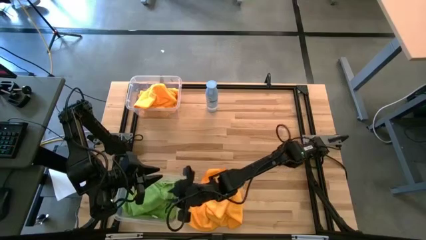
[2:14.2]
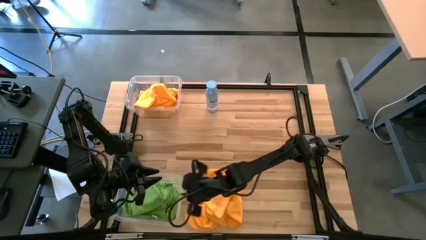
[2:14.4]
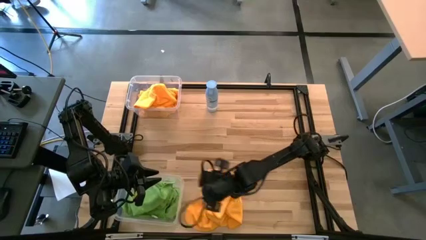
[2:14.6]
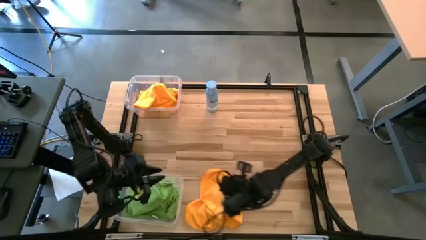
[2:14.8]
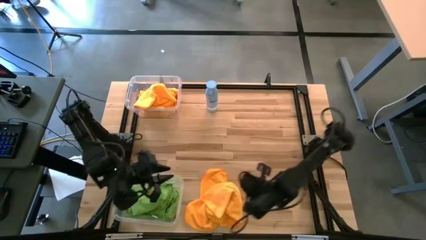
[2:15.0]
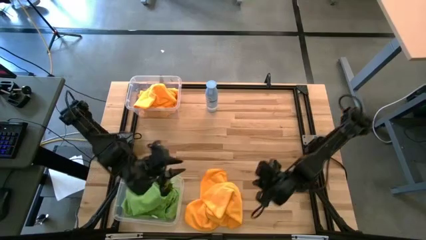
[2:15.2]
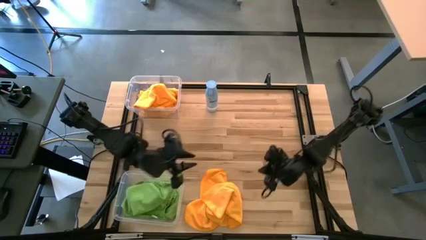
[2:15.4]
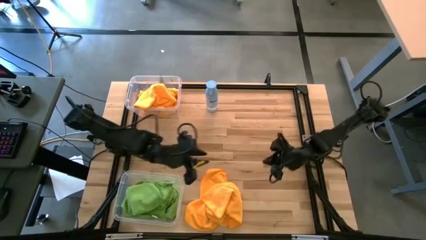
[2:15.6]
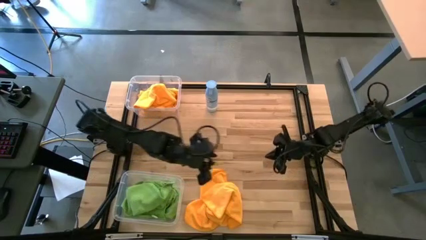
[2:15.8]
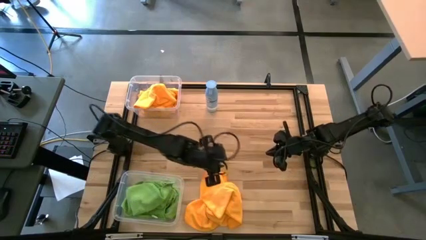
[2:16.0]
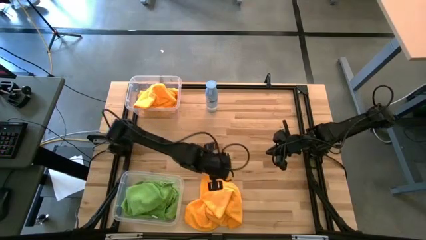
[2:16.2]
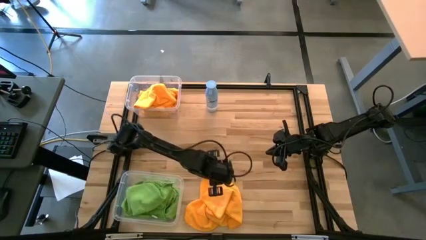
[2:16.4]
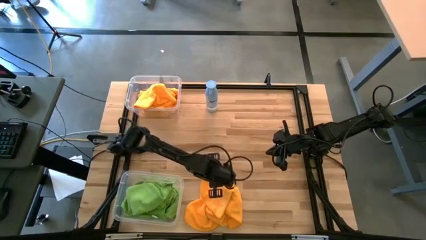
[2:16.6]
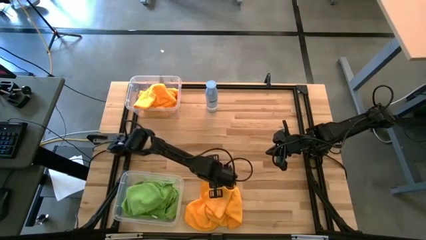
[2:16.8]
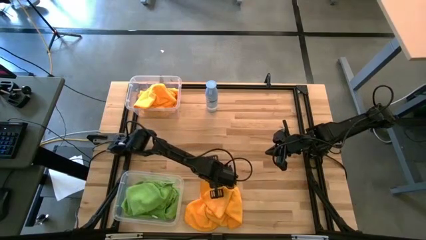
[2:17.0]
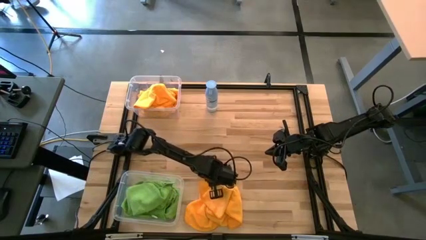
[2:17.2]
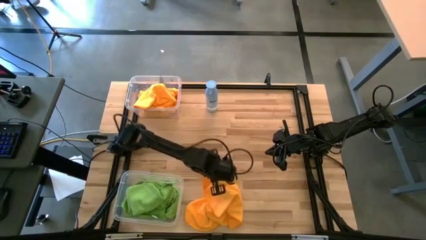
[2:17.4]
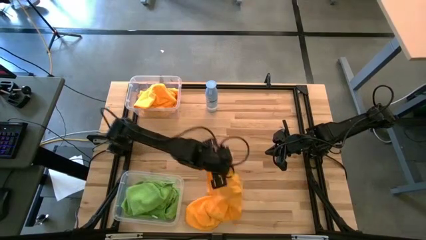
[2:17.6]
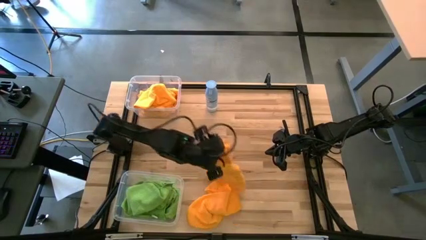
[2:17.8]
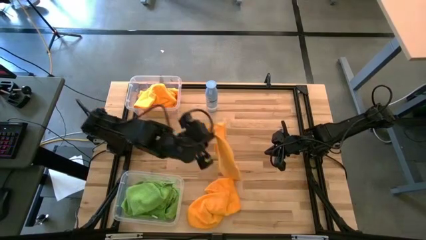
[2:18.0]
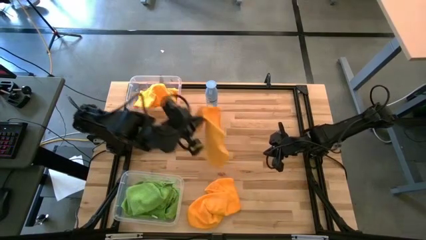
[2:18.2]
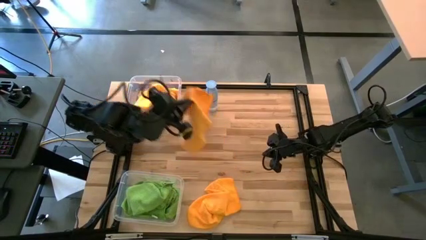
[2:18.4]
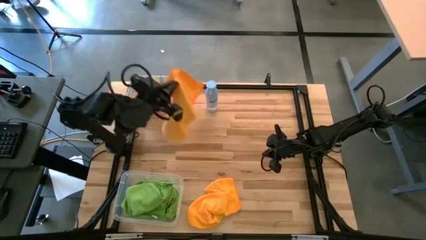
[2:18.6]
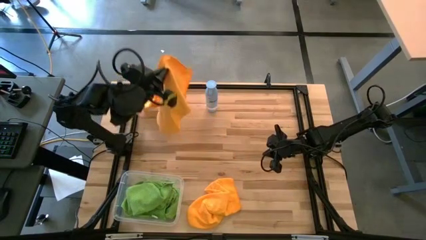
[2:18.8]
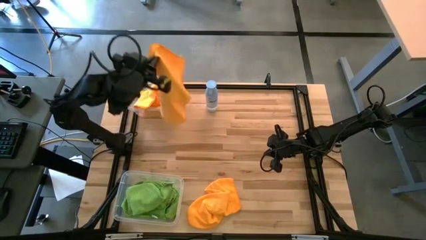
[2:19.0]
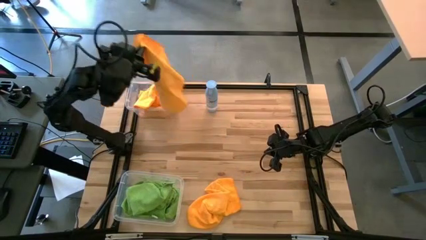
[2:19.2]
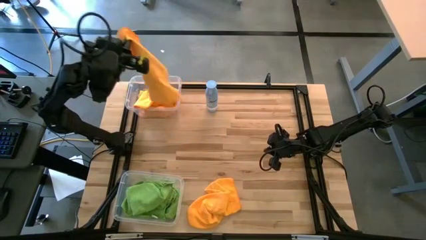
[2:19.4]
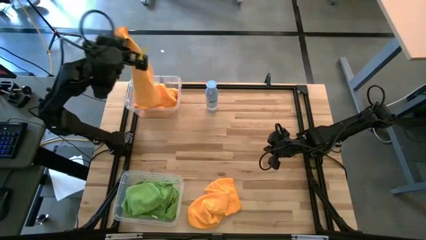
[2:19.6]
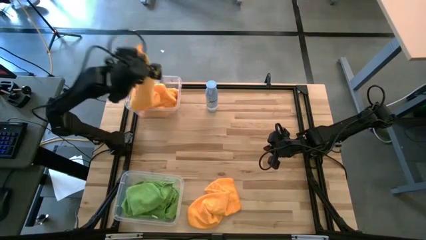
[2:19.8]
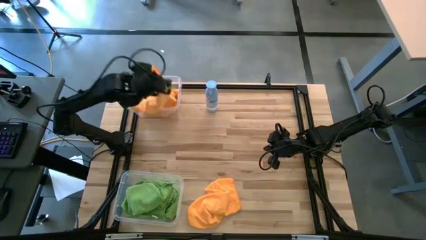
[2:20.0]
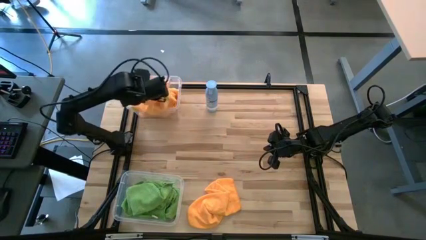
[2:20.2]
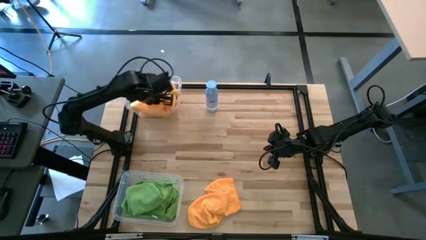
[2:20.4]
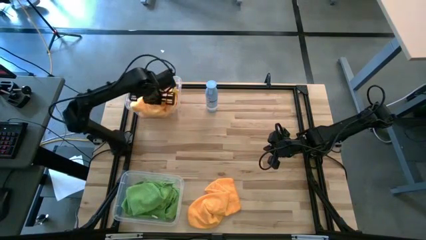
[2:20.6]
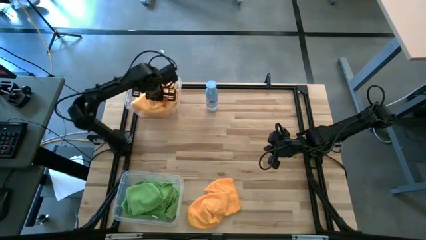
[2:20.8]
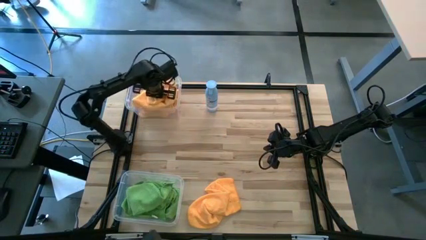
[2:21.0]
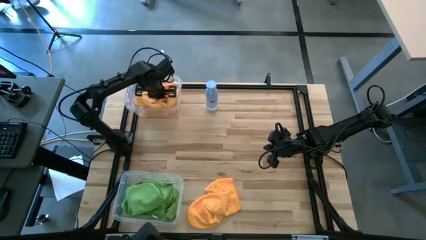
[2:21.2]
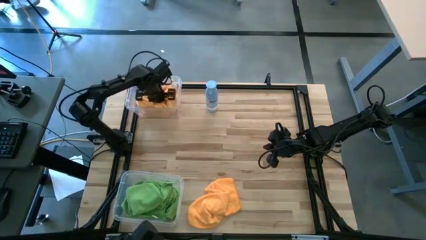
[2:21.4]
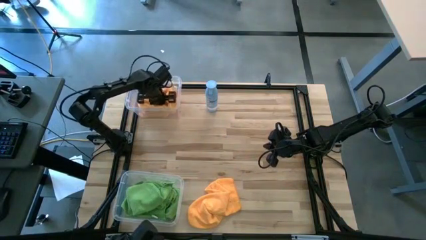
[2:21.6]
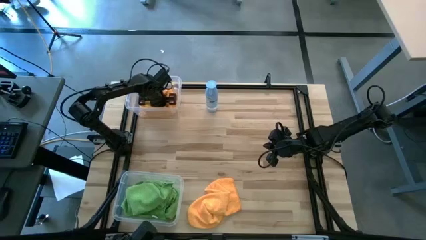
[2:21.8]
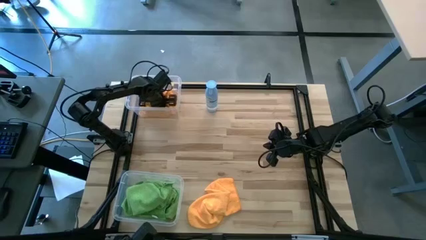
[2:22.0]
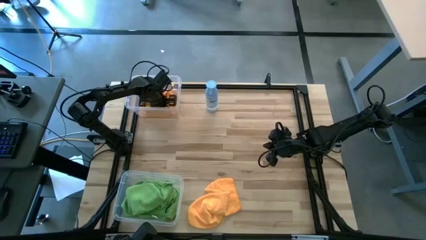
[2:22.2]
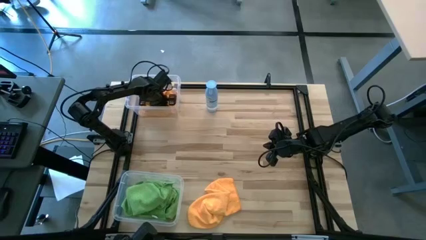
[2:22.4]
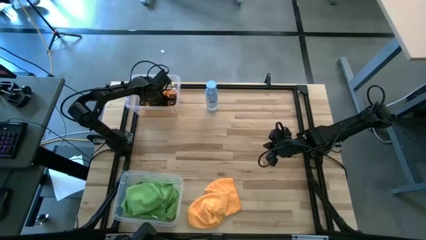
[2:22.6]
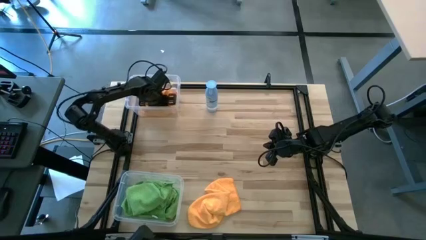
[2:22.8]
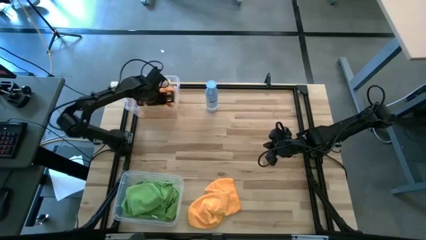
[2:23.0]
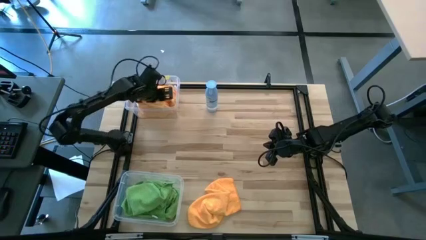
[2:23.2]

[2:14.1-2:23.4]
Task: Sort microfiber towel by color & place in baskets
Put the yellow microfiber towel into the top transparent bin

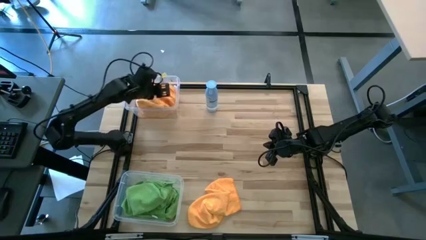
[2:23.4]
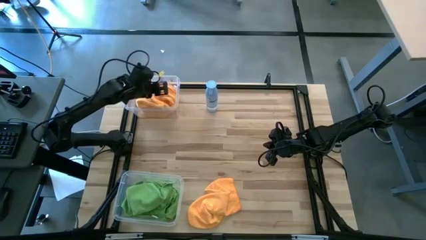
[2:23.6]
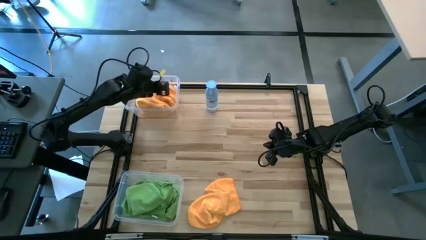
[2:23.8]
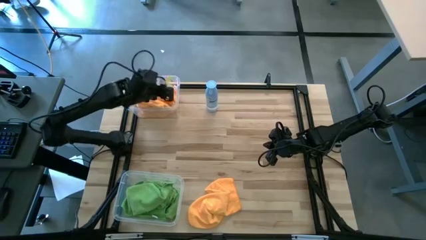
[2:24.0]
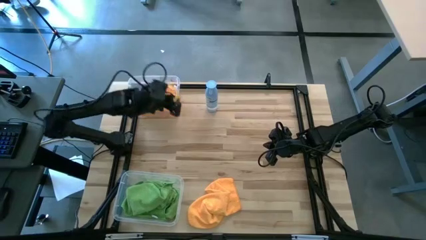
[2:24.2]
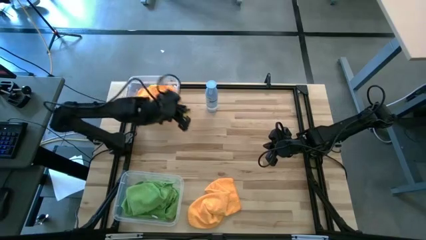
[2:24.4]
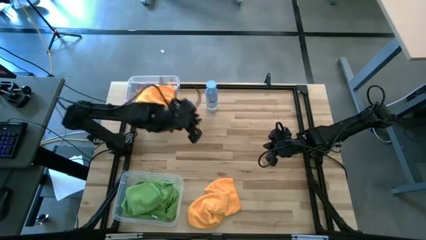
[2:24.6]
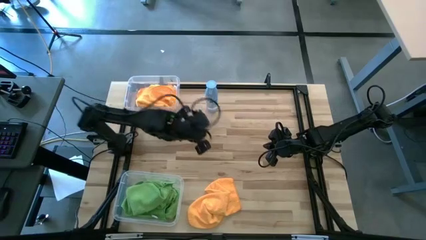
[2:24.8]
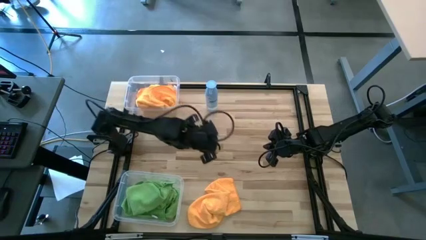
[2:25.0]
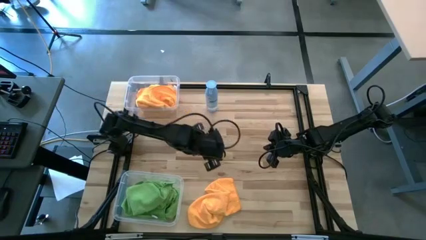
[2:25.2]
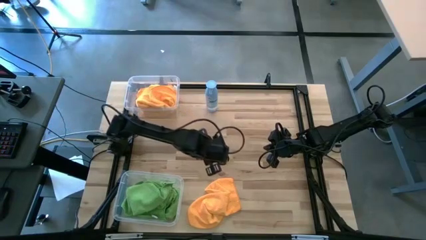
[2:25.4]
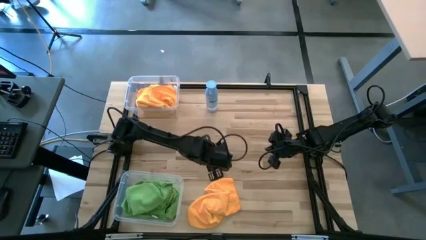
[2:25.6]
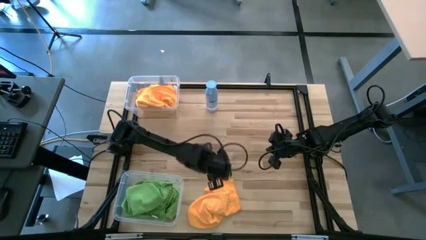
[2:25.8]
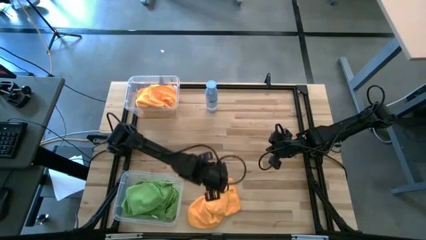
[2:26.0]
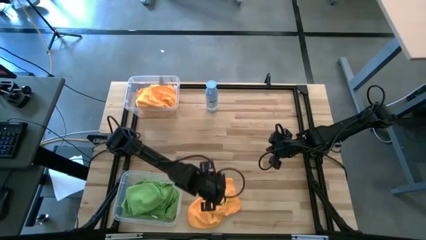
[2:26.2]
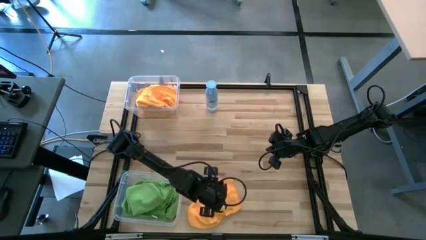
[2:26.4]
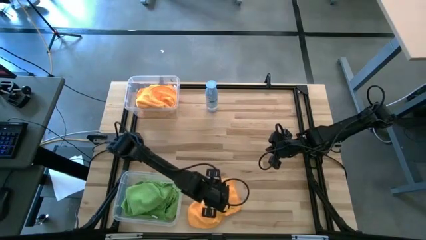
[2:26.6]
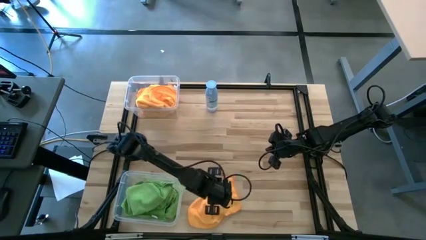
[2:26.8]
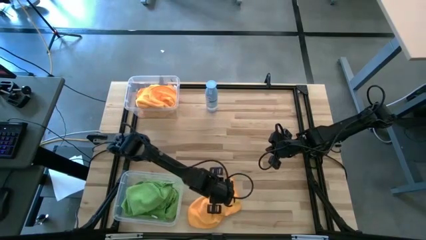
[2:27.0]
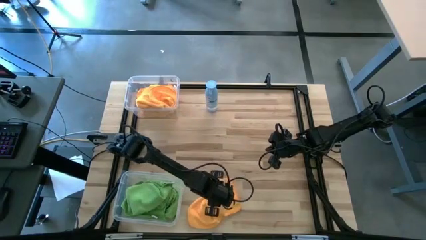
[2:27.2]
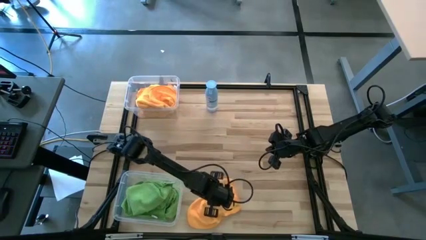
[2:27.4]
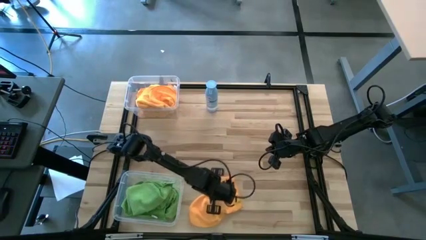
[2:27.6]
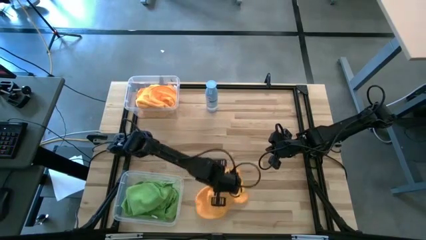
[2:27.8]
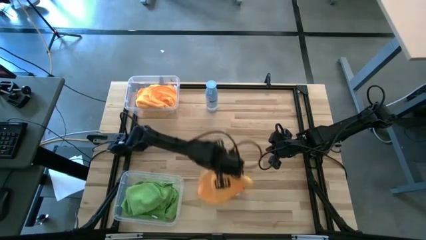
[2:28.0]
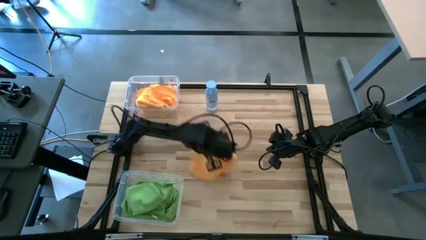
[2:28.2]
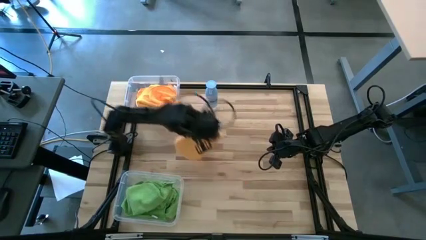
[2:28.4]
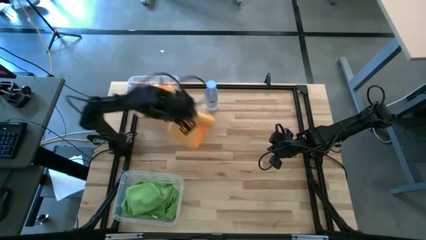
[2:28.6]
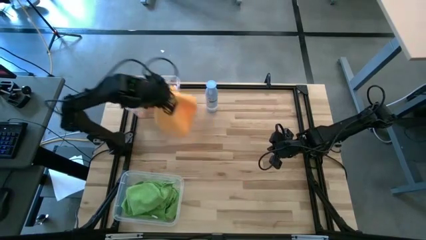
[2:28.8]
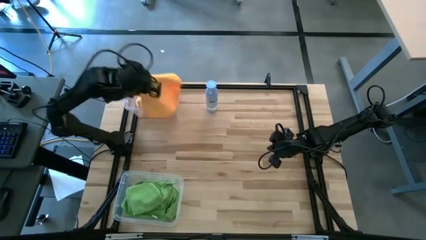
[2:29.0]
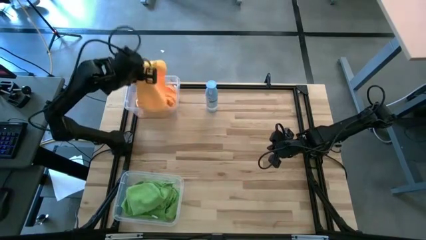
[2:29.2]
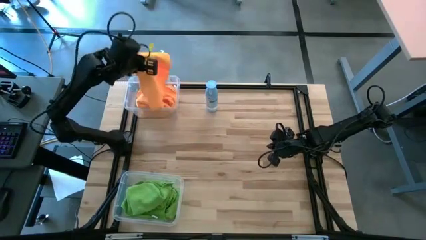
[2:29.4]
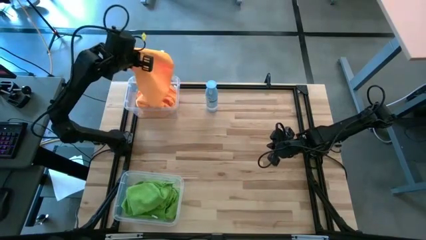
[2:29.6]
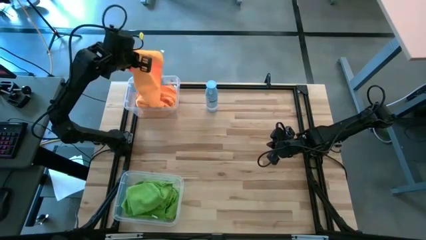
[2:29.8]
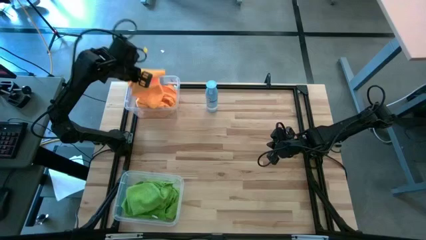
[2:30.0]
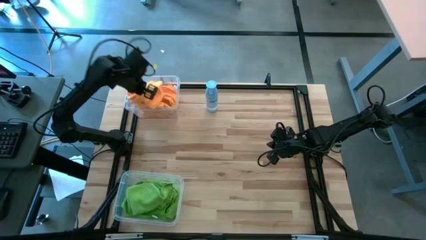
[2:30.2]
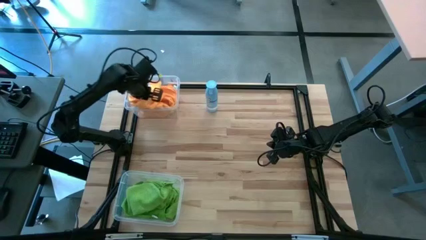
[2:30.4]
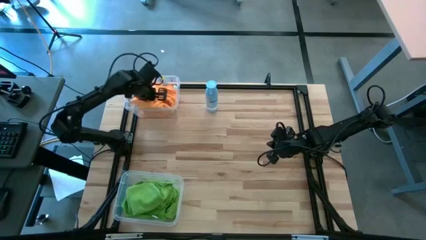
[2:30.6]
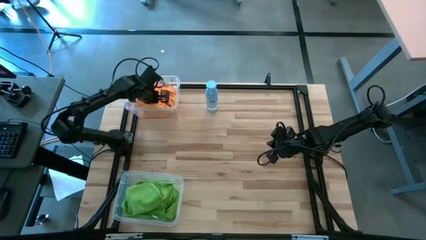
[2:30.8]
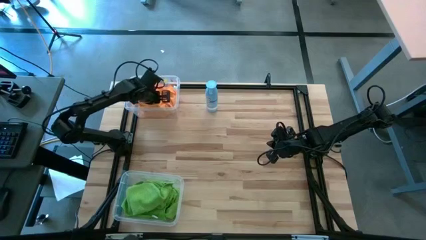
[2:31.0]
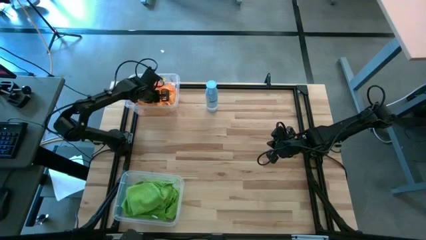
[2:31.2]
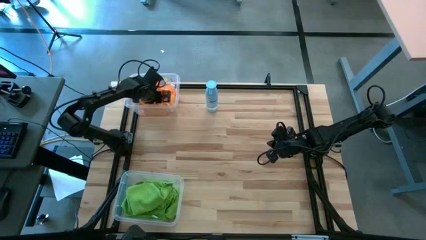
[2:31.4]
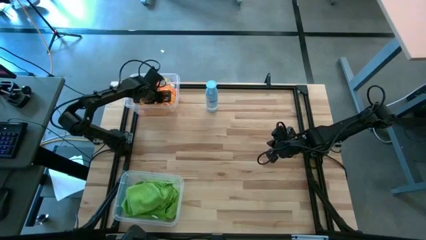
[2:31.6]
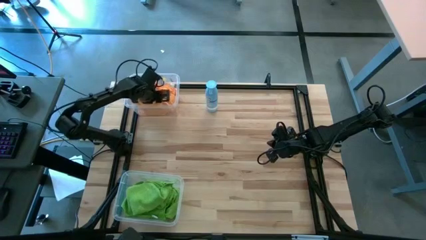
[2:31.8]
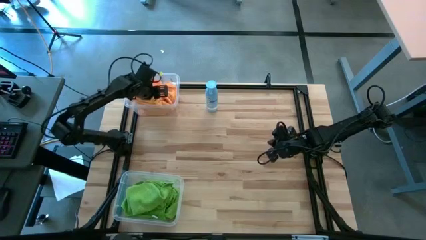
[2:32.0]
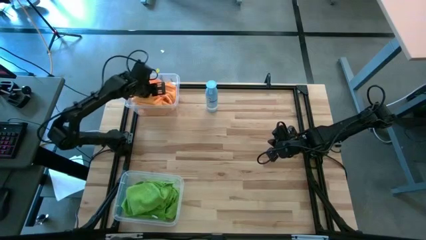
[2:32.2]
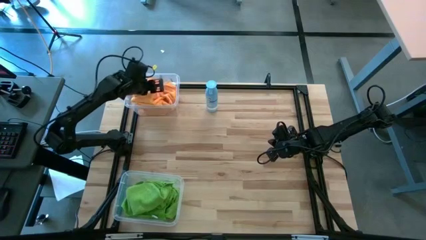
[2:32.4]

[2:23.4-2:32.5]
Put the yellow microfiber towel into the top transparent bin
